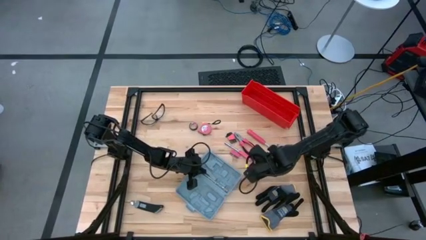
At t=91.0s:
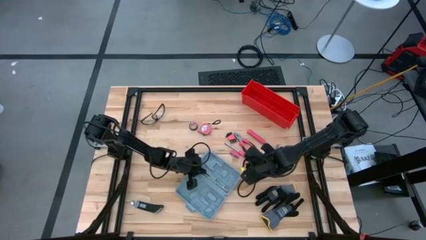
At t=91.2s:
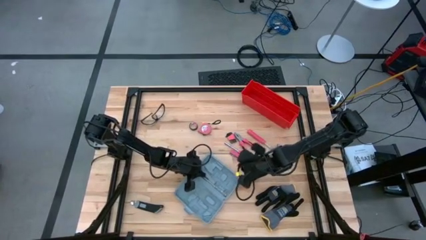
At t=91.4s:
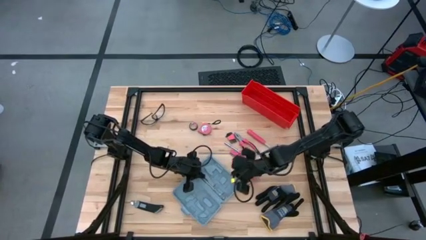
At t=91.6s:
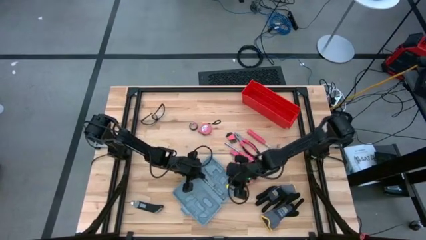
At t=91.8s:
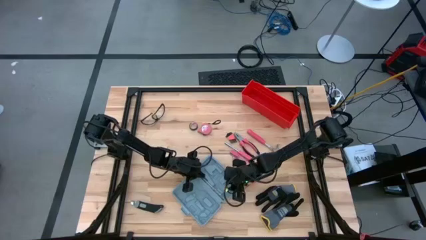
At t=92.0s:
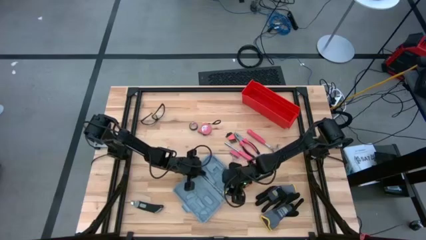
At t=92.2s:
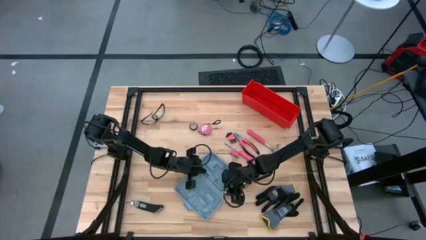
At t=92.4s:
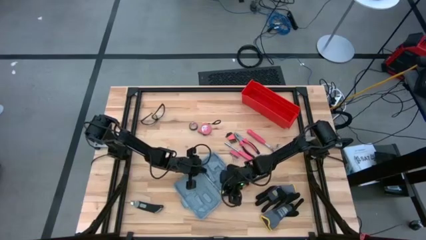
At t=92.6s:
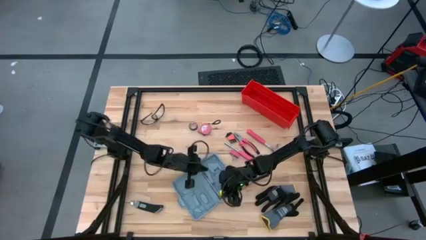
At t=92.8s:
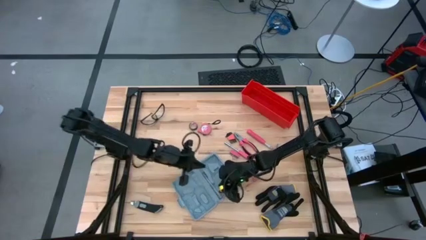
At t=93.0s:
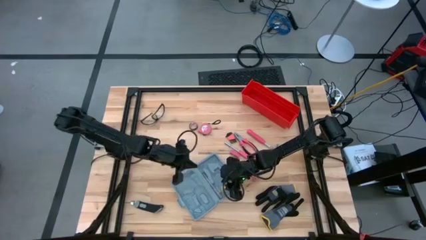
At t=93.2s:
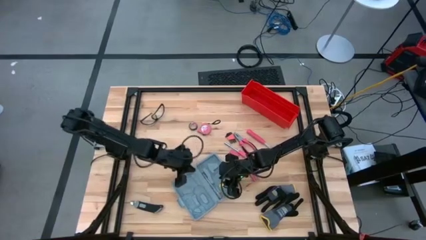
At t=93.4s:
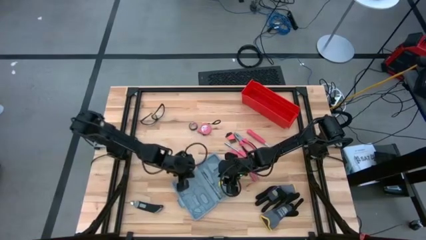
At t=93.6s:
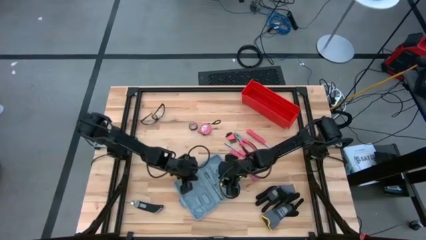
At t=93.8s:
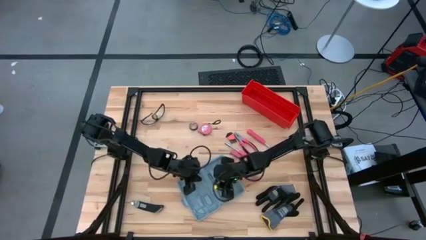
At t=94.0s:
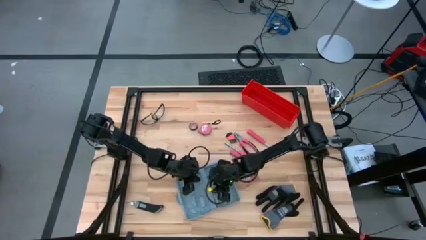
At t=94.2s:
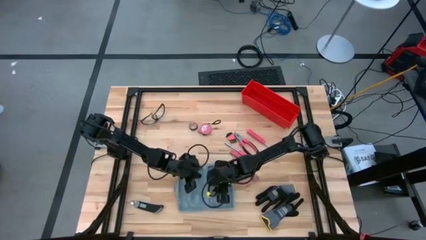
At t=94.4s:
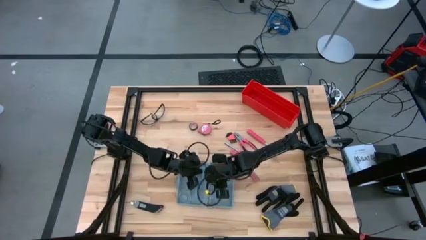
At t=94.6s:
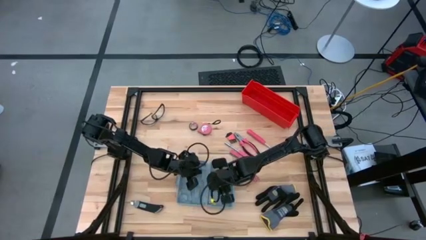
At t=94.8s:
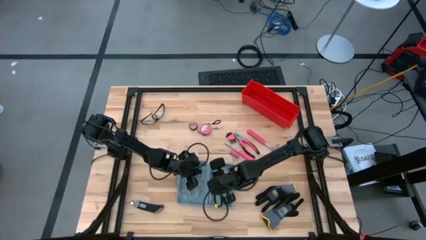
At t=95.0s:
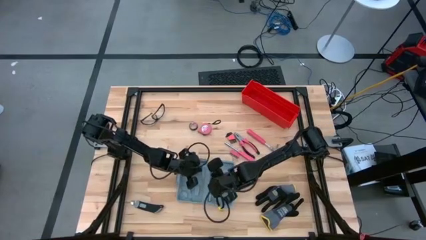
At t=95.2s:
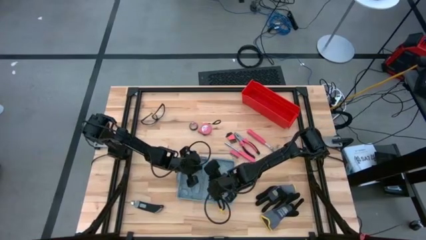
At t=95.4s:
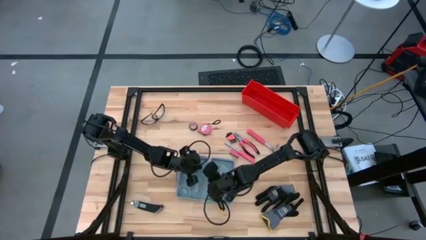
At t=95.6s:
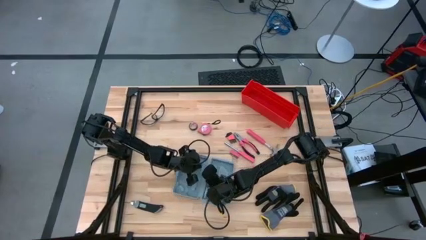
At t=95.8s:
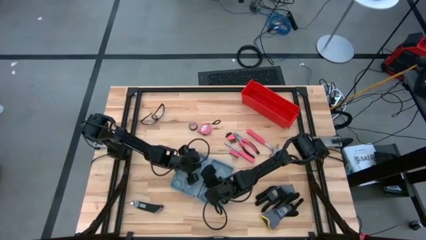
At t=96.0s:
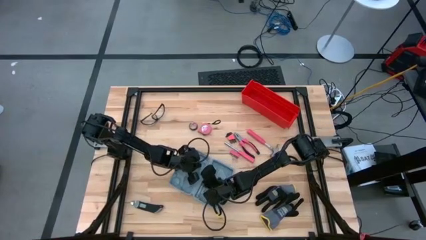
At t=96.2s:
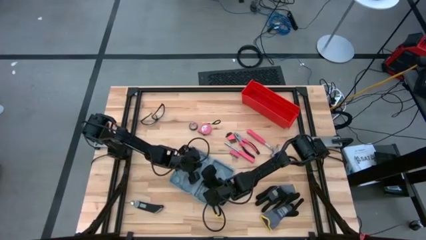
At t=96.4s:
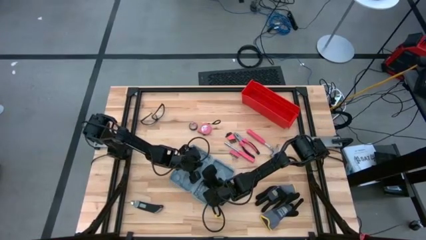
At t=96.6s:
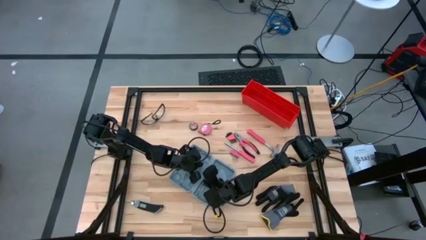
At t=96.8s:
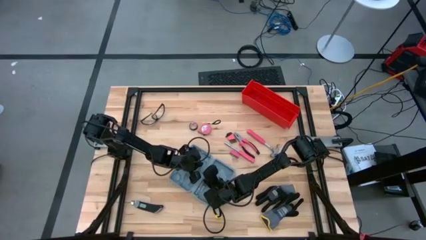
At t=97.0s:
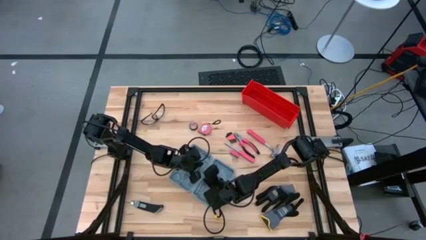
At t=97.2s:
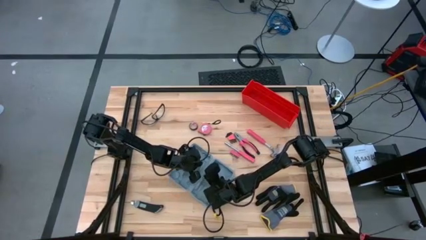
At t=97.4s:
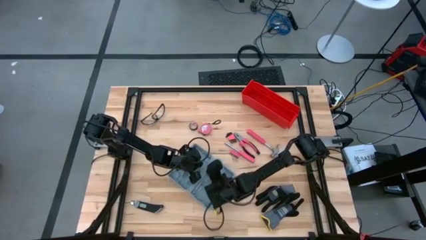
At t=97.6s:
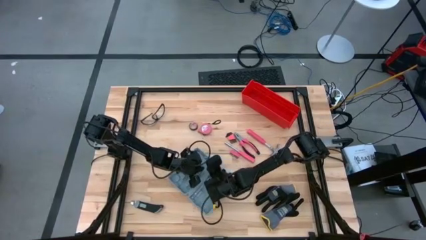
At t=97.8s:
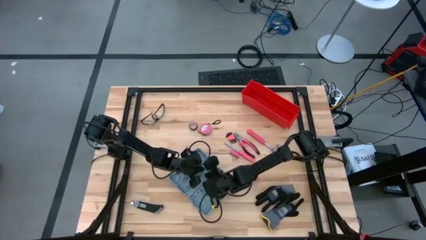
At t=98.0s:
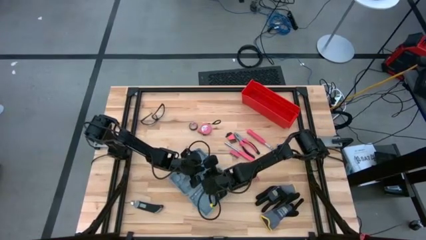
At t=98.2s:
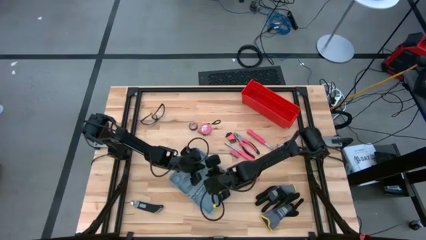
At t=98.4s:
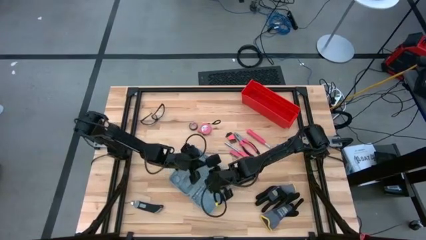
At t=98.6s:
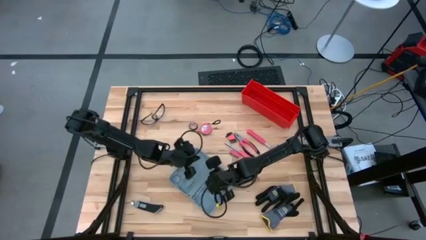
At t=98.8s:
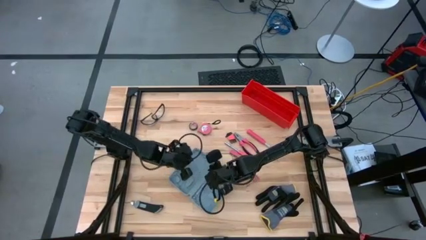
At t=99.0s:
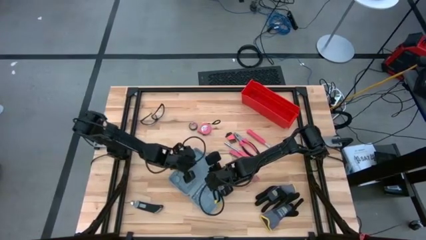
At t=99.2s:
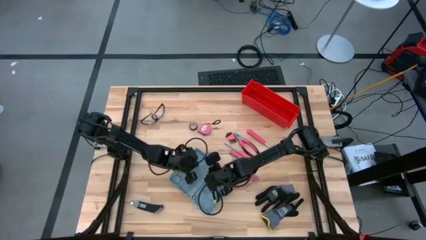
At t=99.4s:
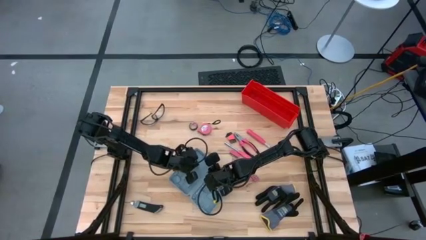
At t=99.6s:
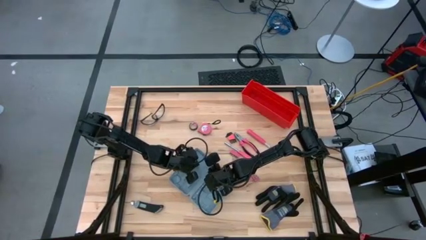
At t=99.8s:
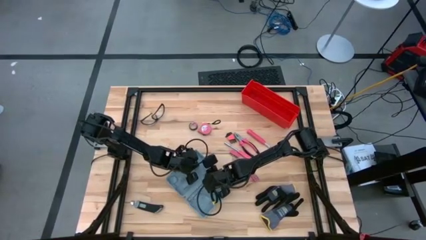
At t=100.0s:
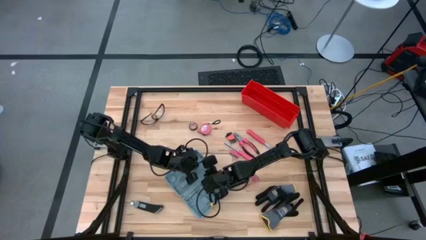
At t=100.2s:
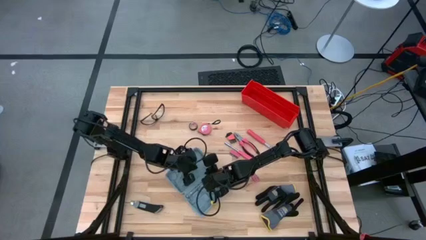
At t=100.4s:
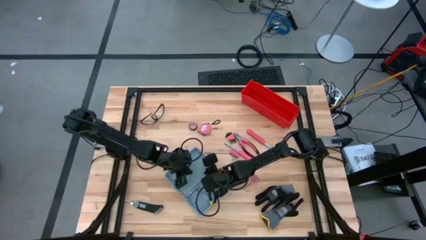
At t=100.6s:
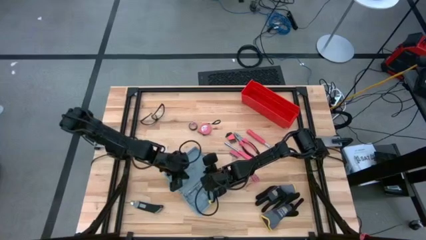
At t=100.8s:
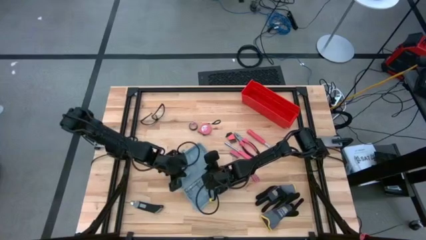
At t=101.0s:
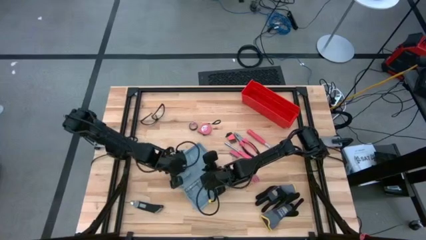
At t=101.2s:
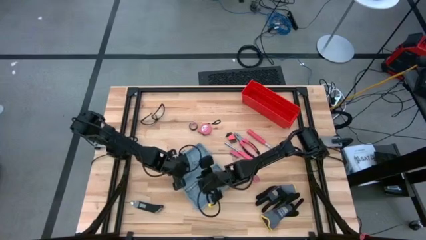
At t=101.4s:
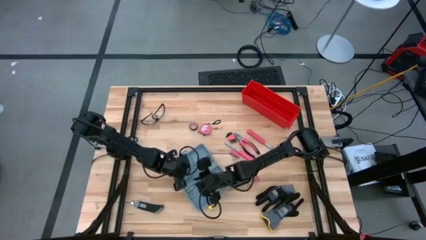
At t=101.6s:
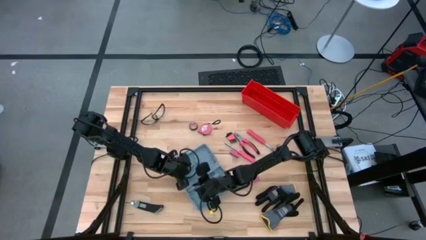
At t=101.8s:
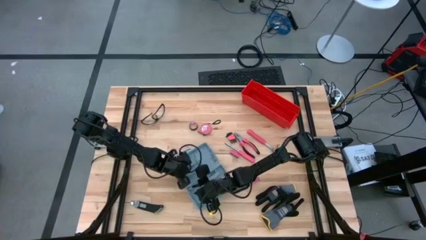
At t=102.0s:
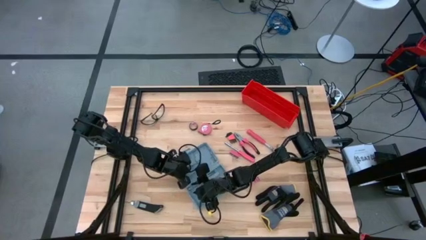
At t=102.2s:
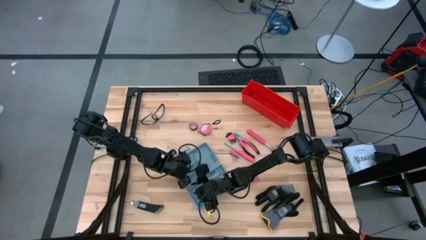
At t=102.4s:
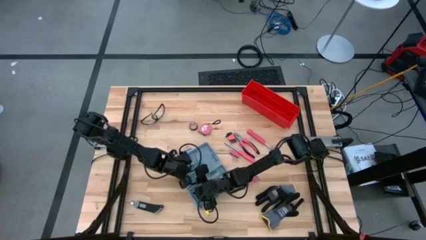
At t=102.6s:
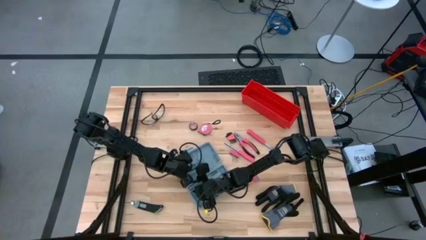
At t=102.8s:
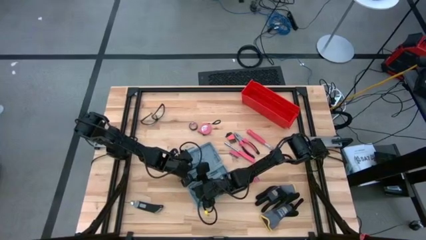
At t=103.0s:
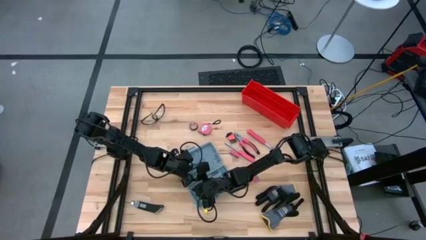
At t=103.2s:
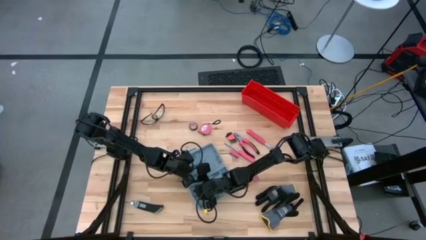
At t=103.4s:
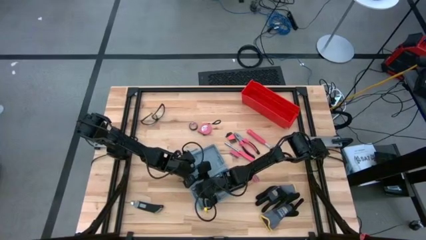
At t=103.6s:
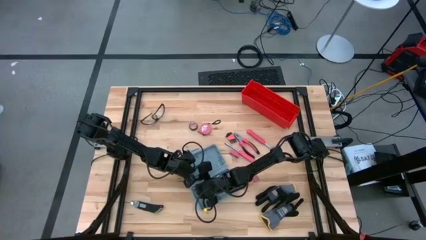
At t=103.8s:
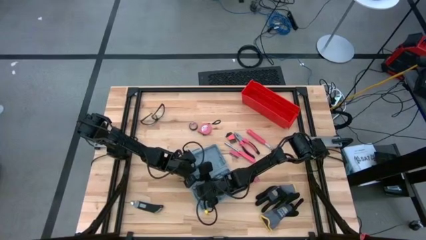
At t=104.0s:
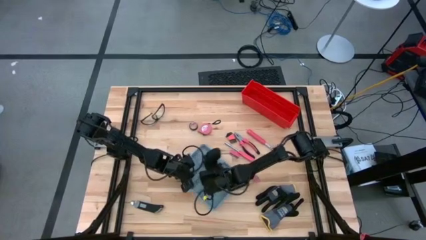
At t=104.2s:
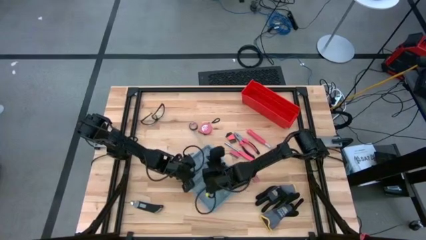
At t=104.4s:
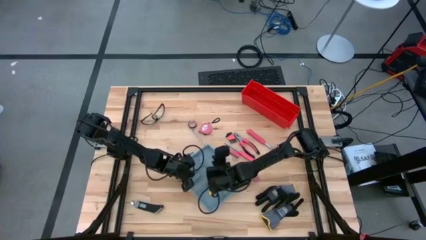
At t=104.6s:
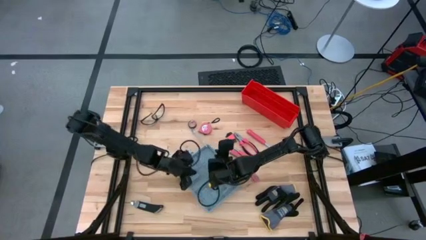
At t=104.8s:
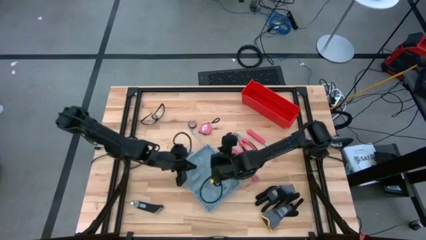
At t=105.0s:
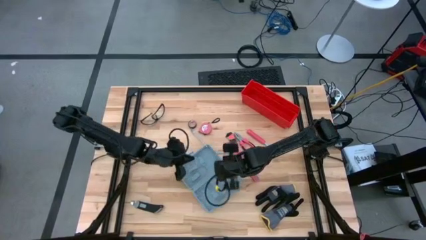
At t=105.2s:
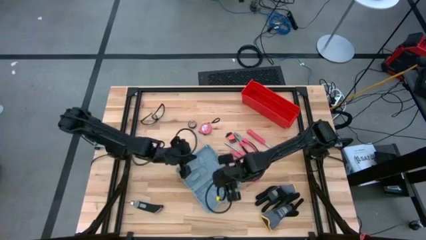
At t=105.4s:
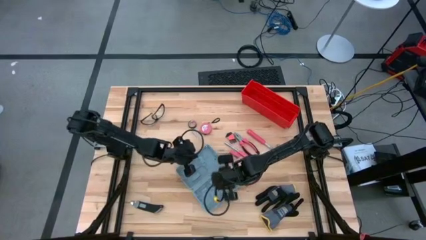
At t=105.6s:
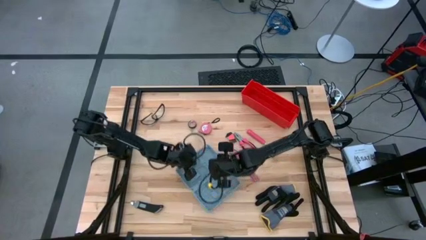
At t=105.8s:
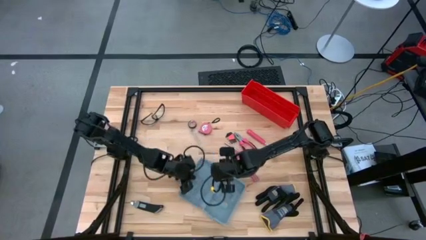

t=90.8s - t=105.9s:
Task: prefit tool cases
Remove the voltage tester from the toolbox

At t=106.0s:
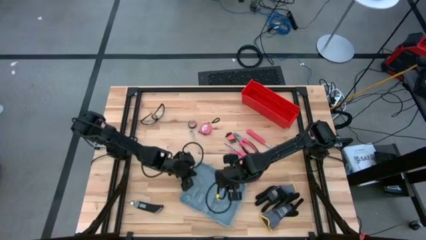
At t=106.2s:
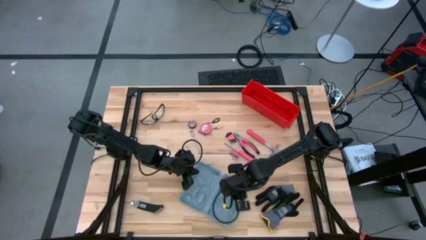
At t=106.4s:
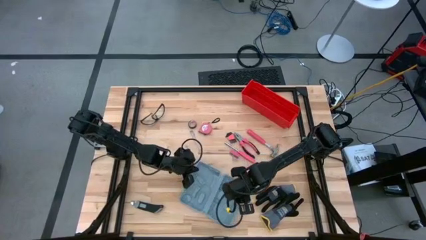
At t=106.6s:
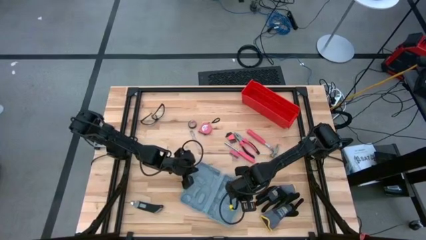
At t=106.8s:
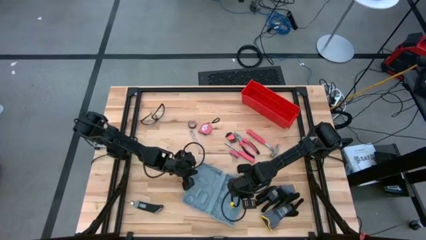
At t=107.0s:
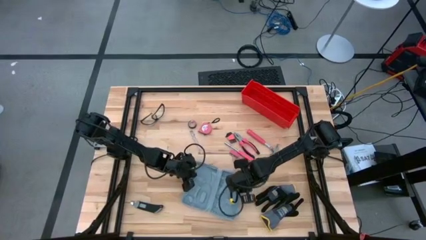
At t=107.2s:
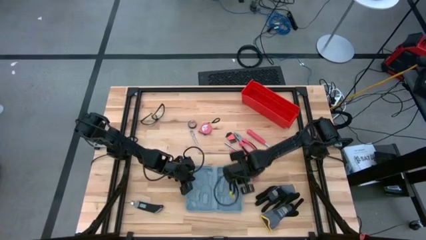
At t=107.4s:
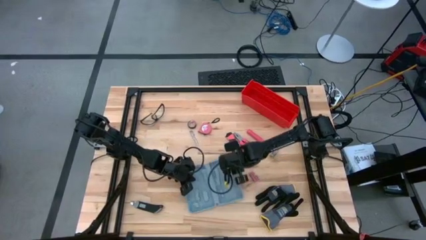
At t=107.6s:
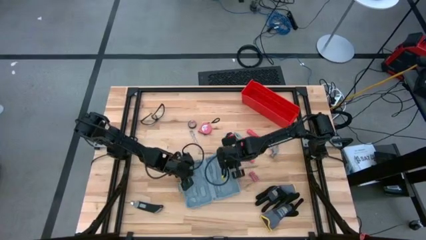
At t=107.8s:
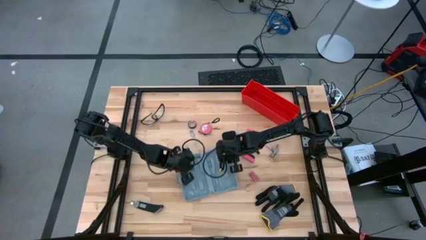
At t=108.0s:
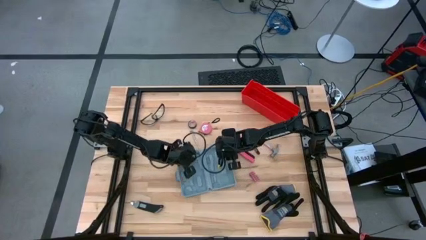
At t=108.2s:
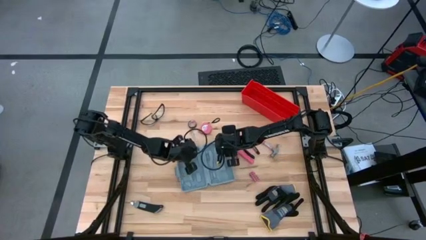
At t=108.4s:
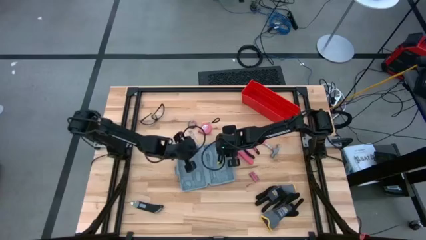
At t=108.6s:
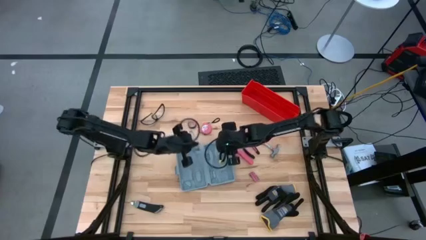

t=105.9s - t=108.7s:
Adjust the toolbox
